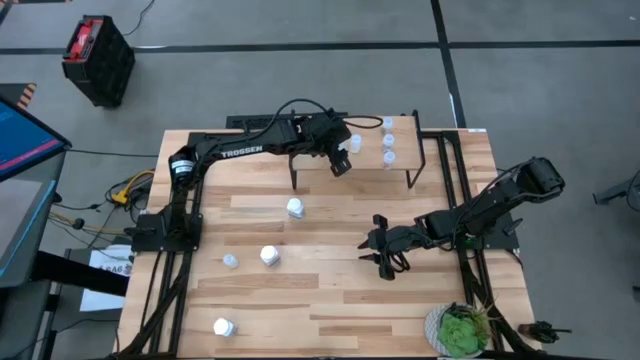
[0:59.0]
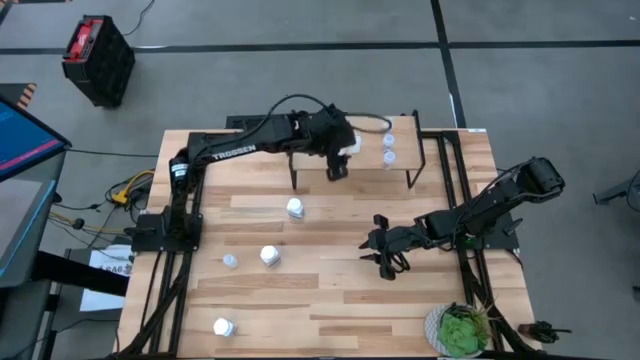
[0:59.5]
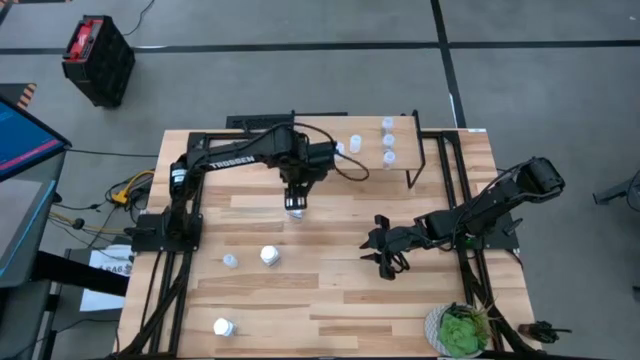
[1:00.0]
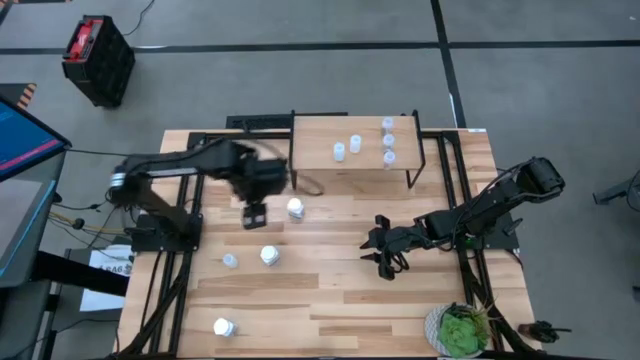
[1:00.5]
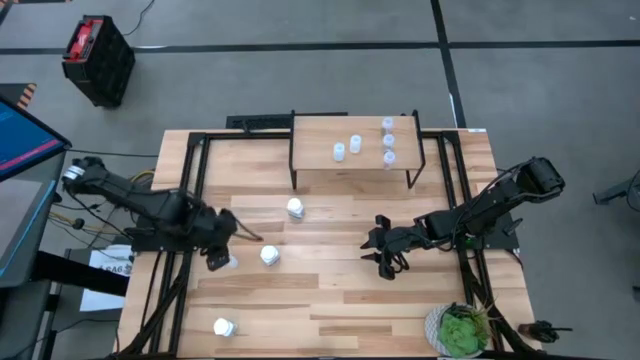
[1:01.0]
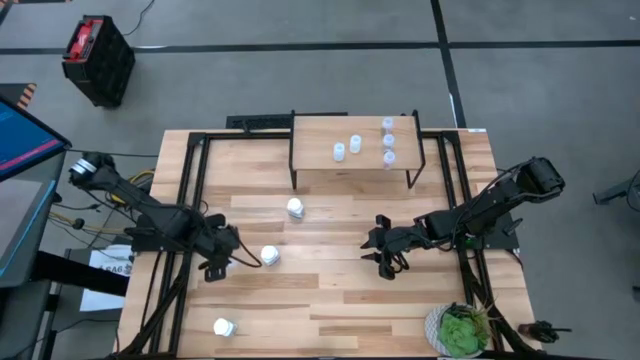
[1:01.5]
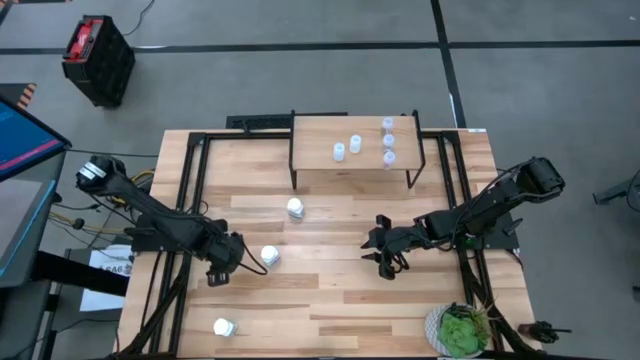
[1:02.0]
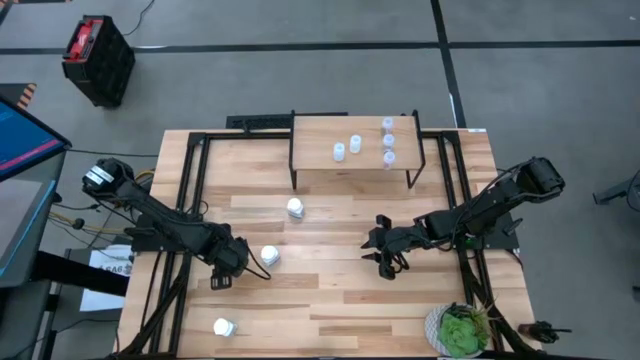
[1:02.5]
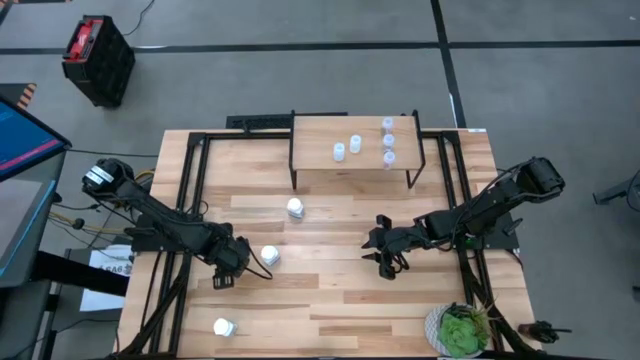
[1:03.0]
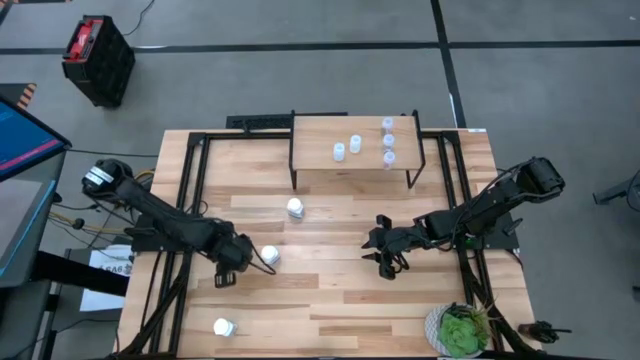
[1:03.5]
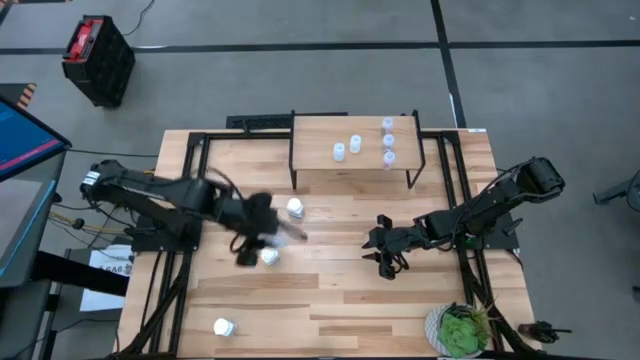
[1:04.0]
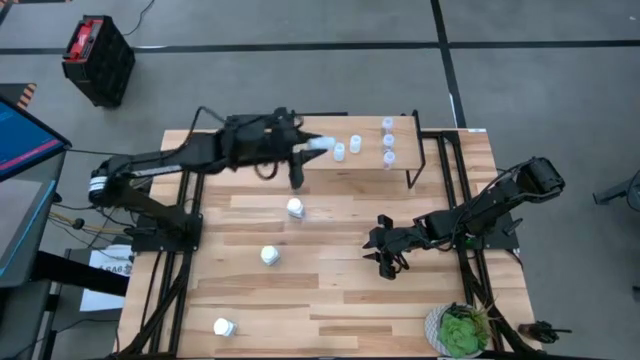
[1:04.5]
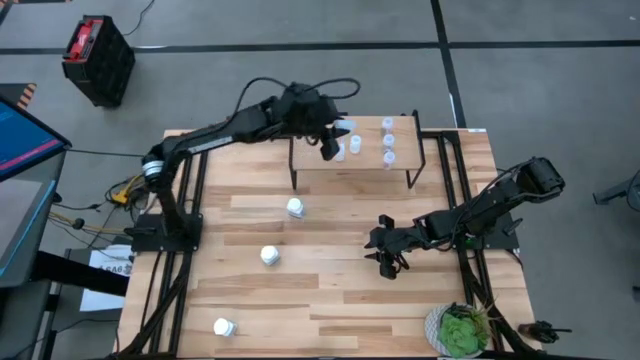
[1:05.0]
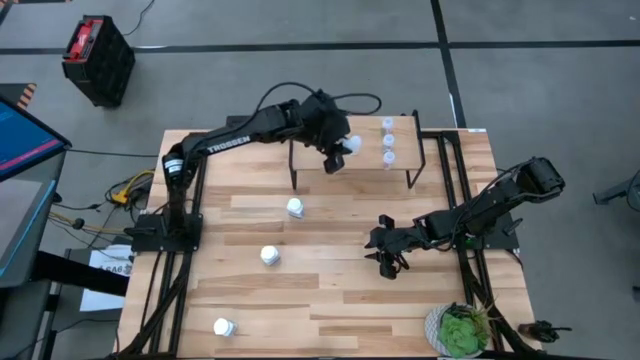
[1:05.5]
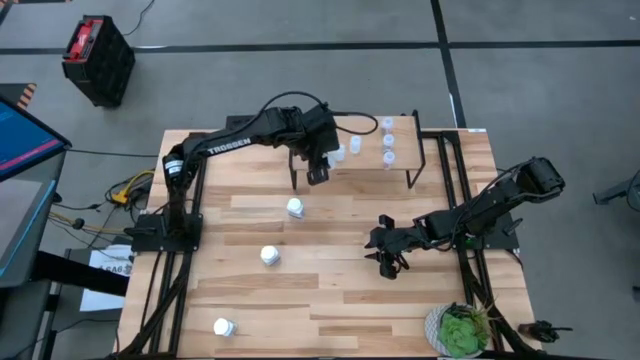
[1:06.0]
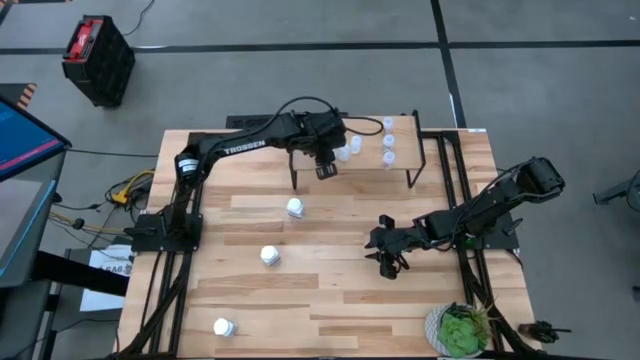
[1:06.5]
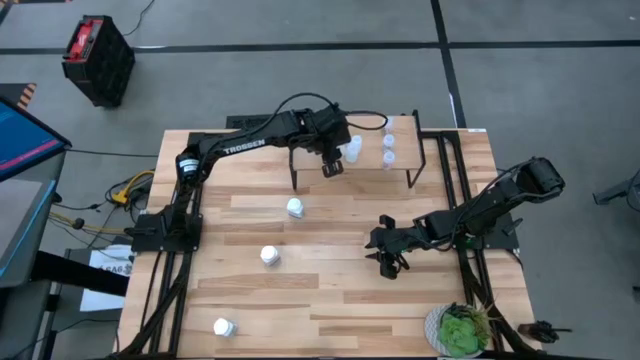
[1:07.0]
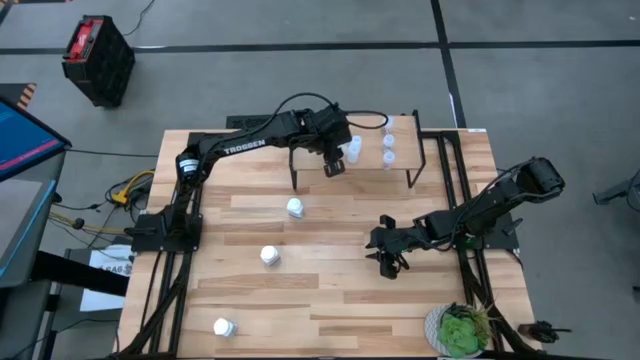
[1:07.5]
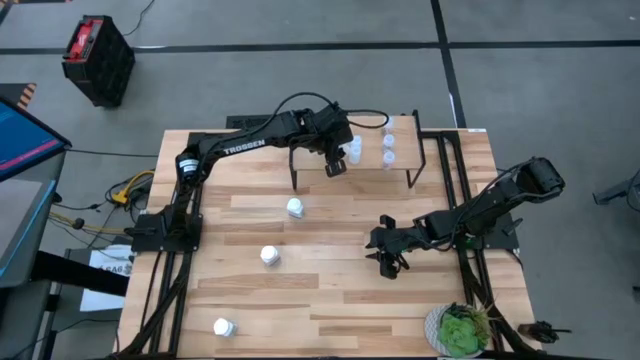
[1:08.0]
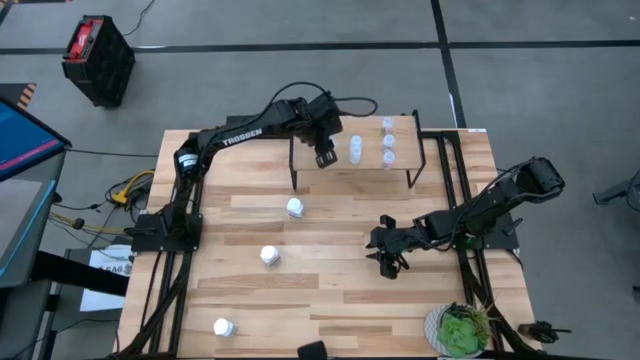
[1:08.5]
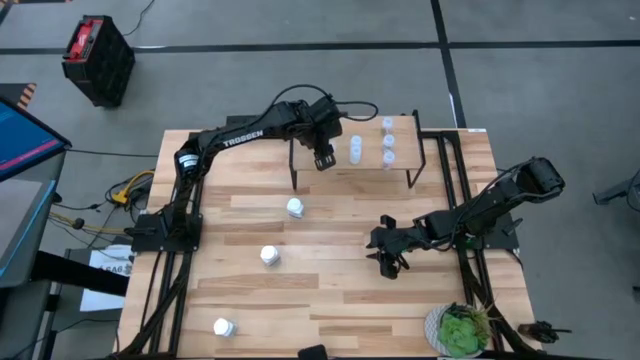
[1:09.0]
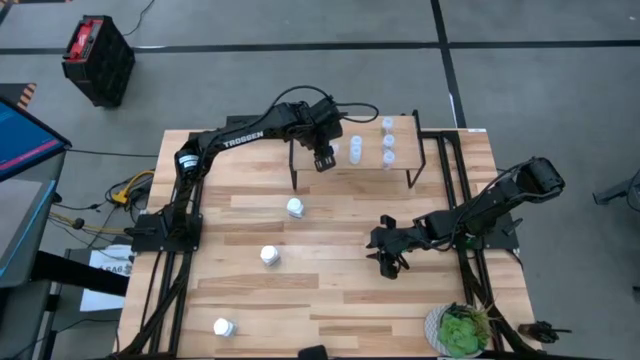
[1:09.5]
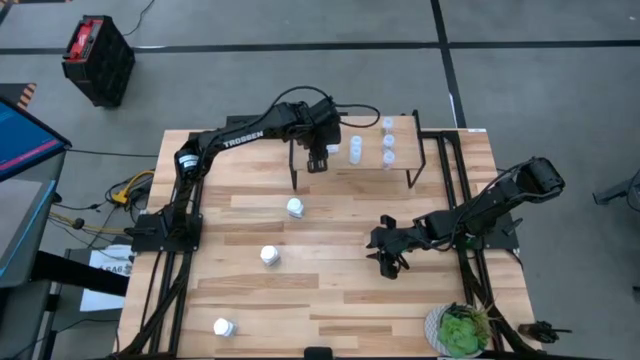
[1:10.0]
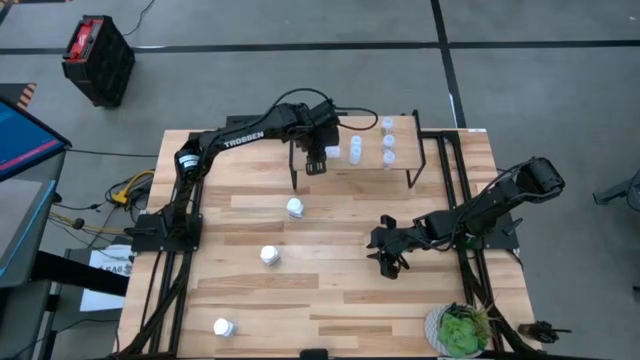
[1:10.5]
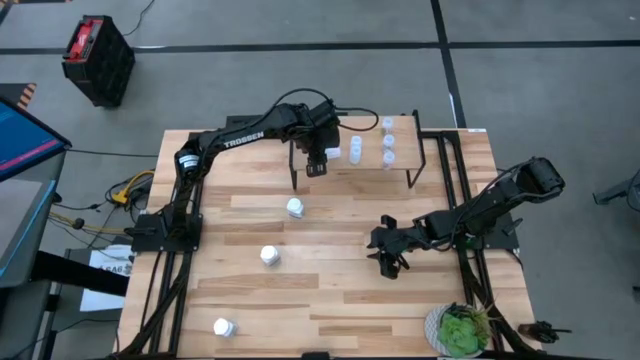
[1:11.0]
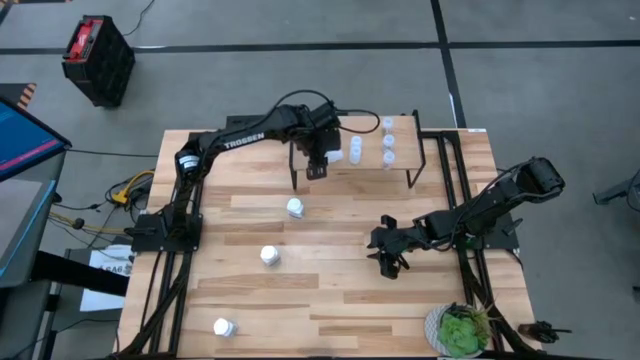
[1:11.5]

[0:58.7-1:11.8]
Task: Pick and place medicine bottles onto shelf by color
Put the translucent medicine bottle onto the middle of the shelf

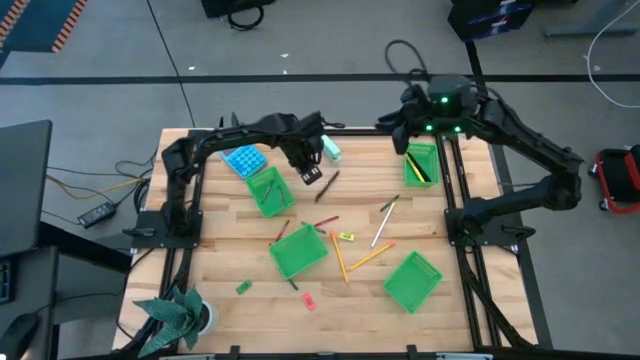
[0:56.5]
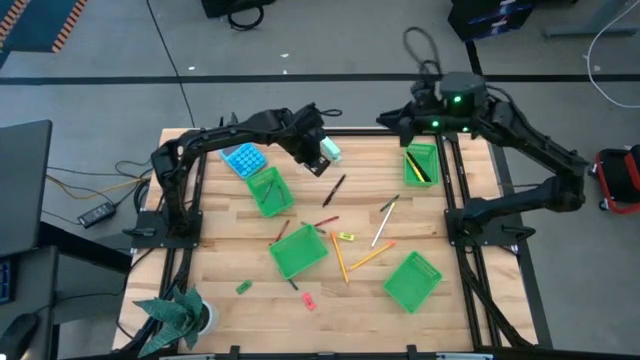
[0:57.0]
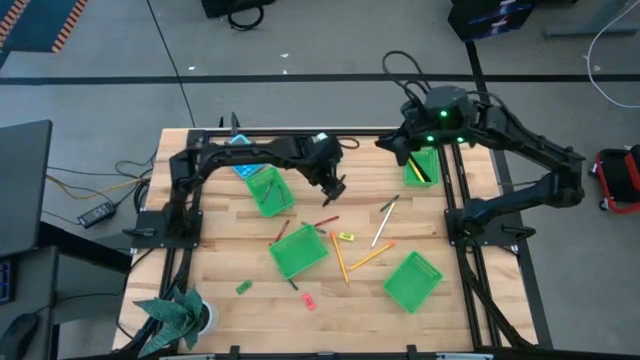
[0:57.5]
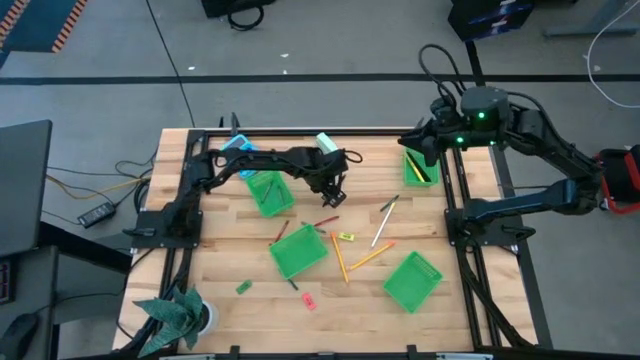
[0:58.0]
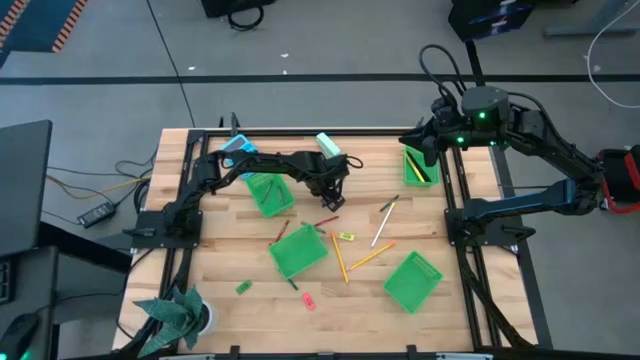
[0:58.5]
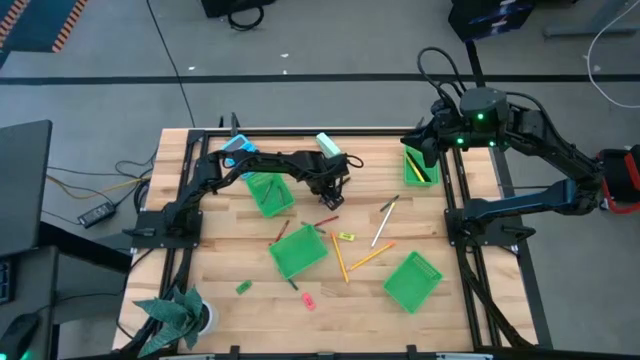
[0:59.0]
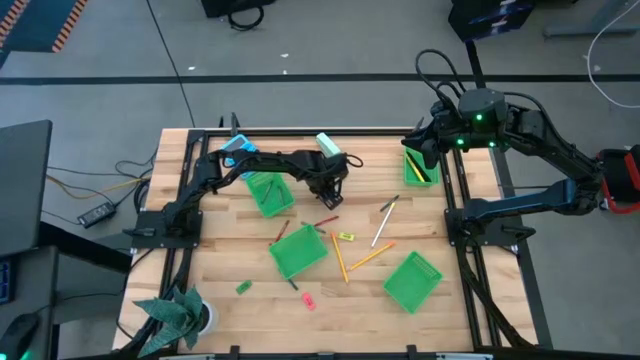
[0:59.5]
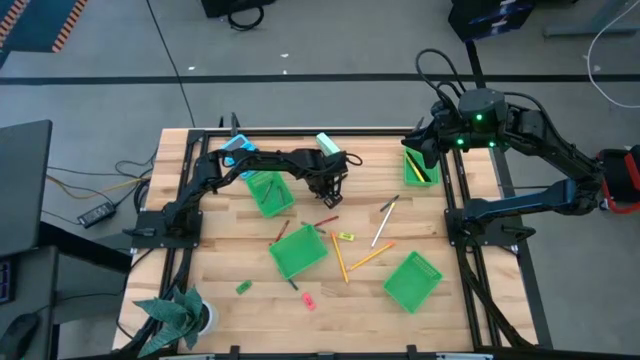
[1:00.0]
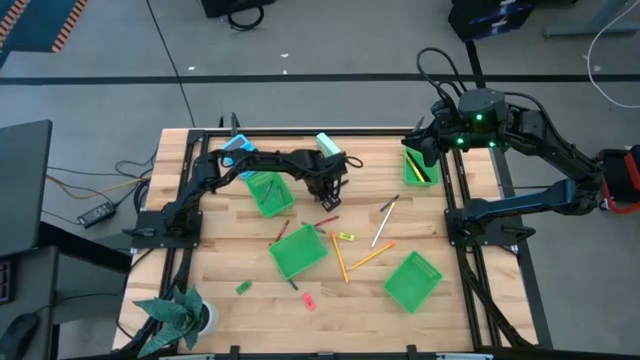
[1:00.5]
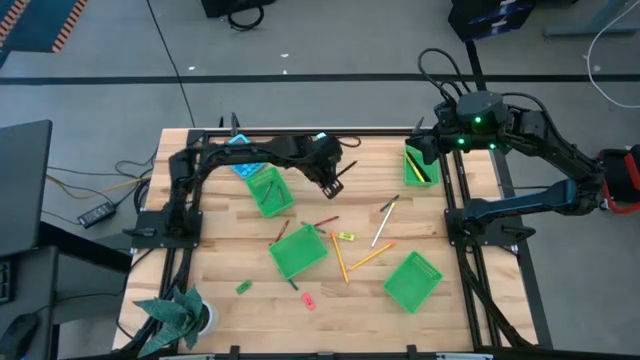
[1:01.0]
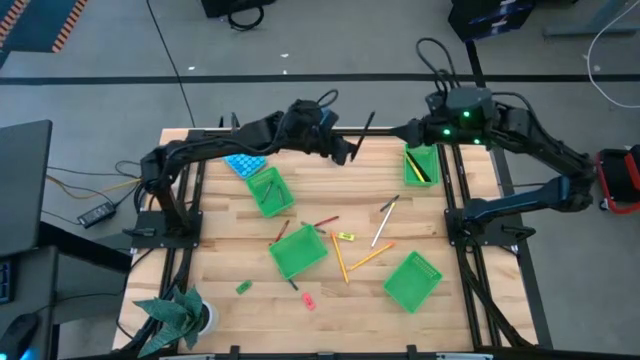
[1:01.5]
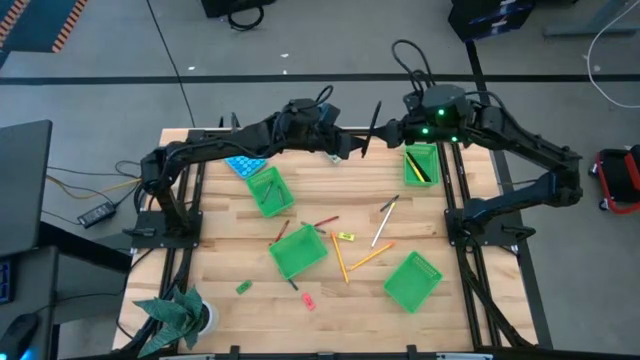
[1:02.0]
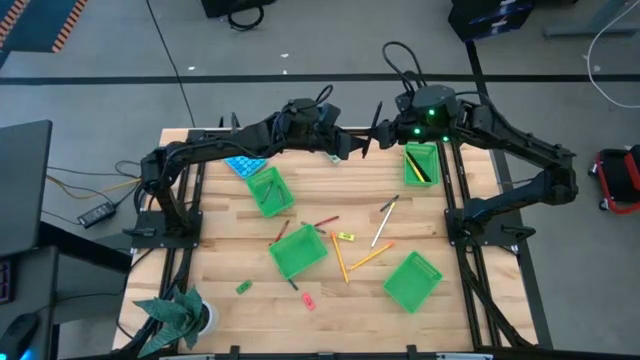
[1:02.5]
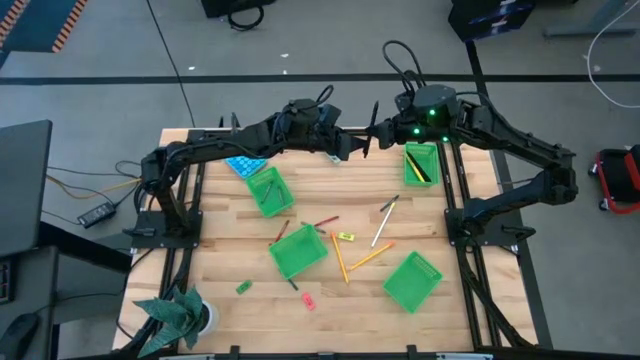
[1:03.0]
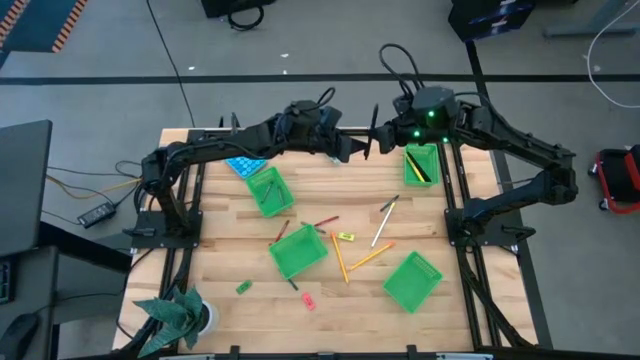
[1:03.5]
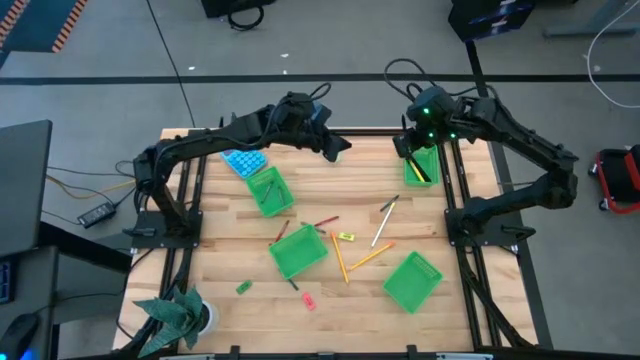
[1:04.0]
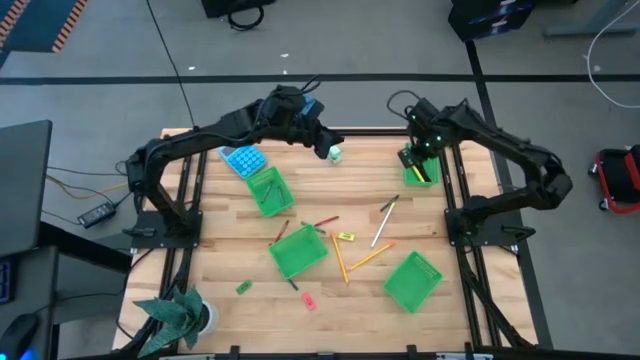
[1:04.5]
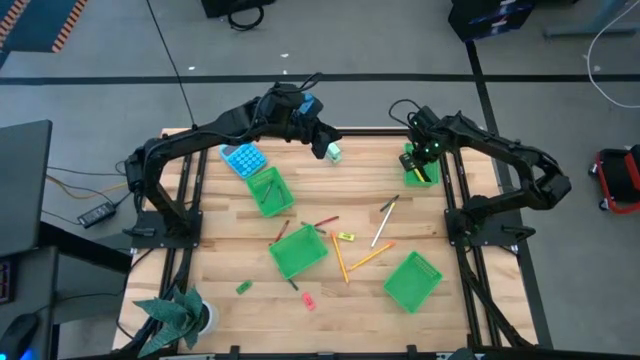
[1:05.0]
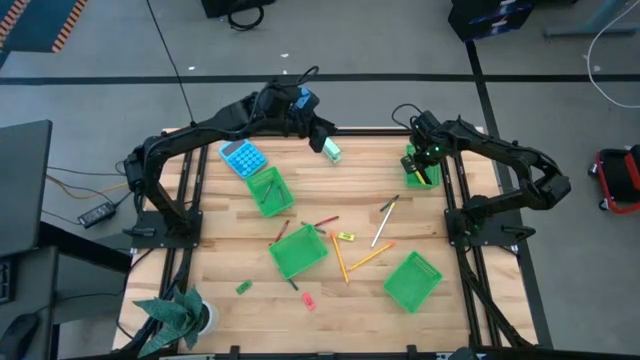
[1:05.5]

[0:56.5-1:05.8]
Task: Sort crayons/erasers/pens/pencils in bins
Put the black pen into the top right green bin
